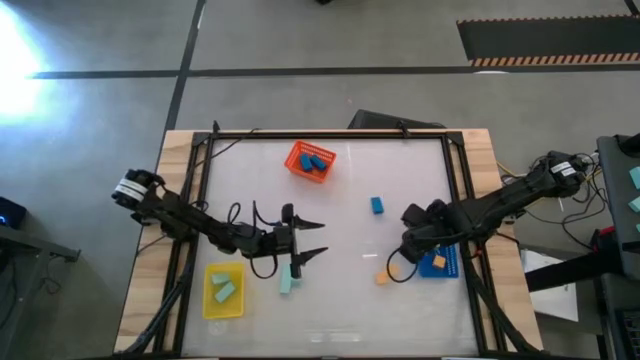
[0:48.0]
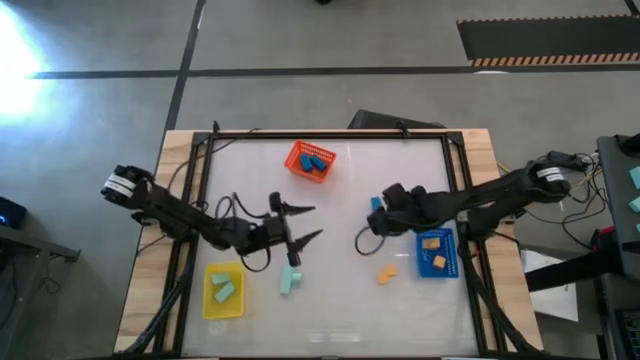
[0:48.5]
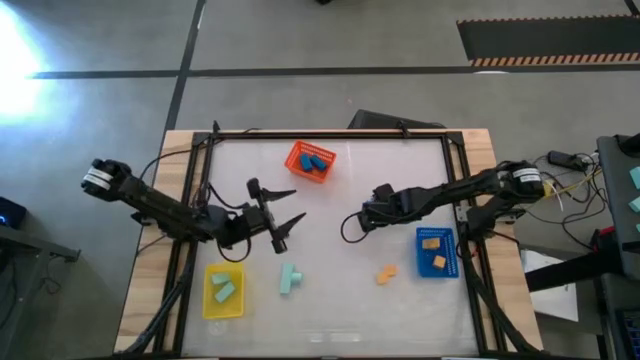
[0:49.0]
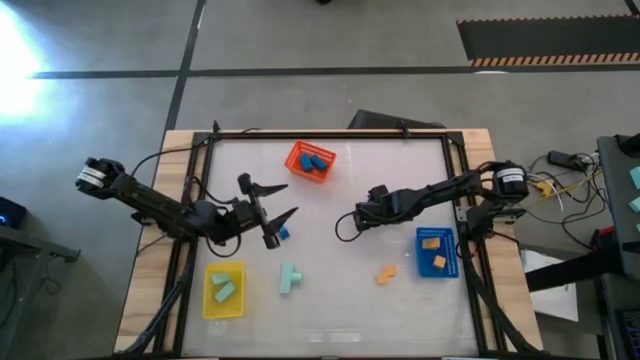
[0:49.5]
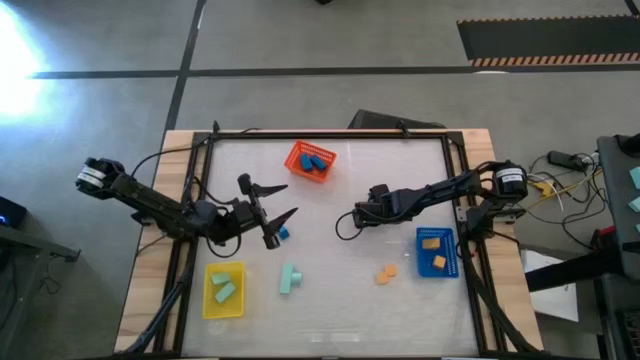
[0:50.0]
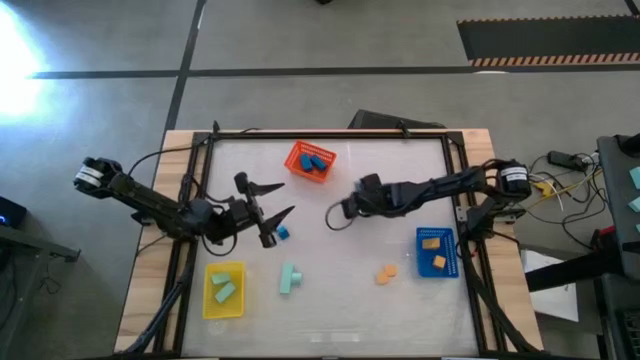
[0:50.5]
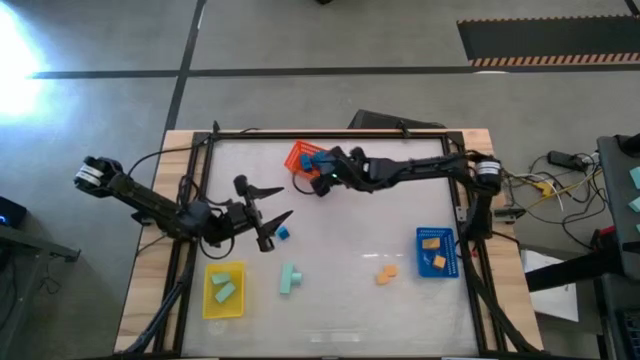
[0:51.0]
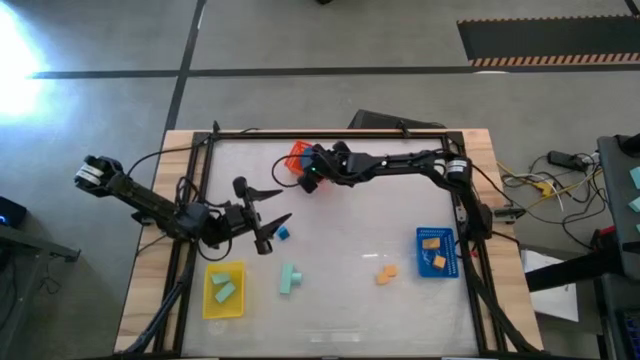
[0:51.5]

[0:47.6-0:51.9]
Task: Sort & place blocks by color
Put the blue block into the orange bin

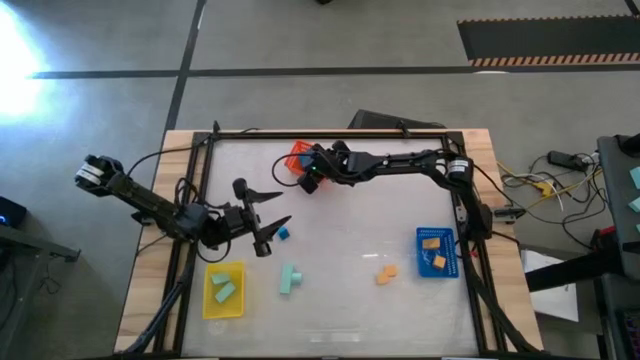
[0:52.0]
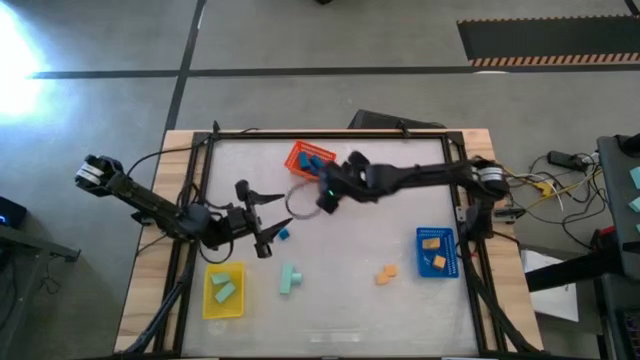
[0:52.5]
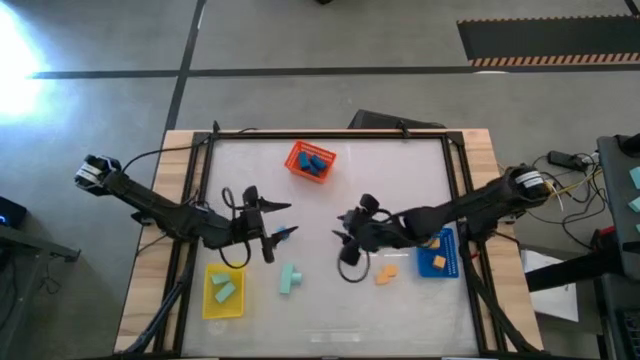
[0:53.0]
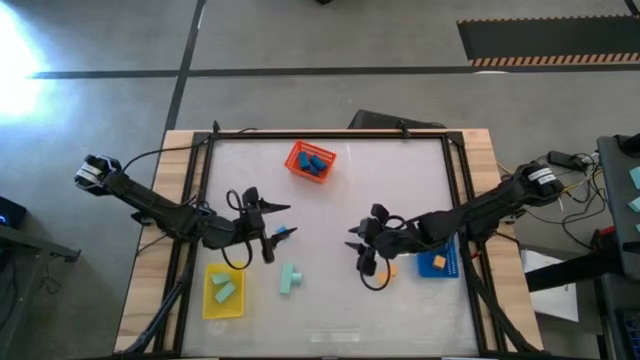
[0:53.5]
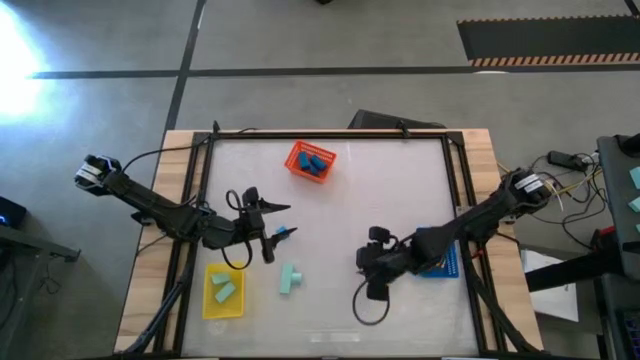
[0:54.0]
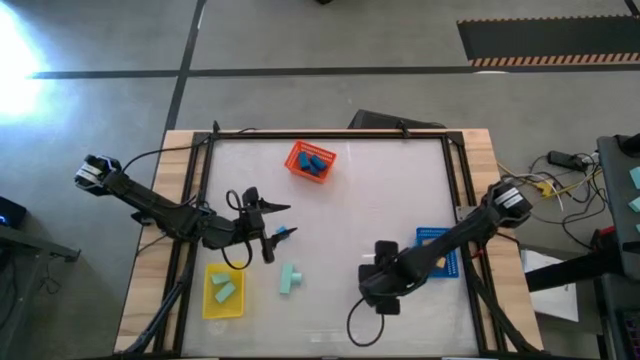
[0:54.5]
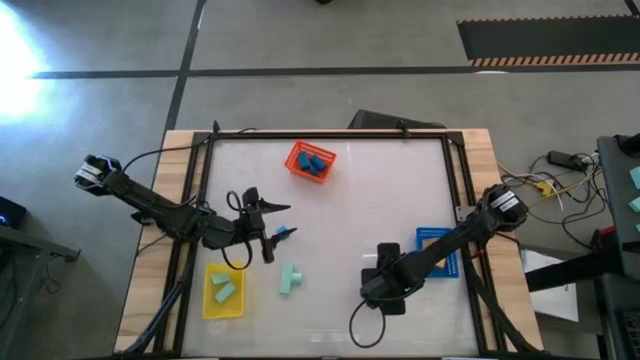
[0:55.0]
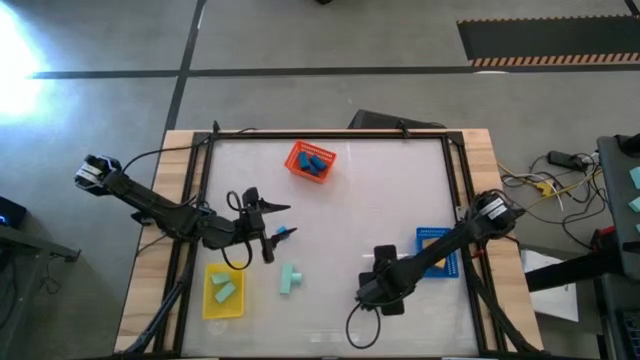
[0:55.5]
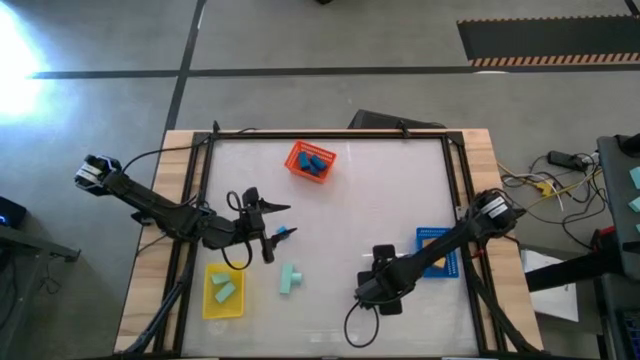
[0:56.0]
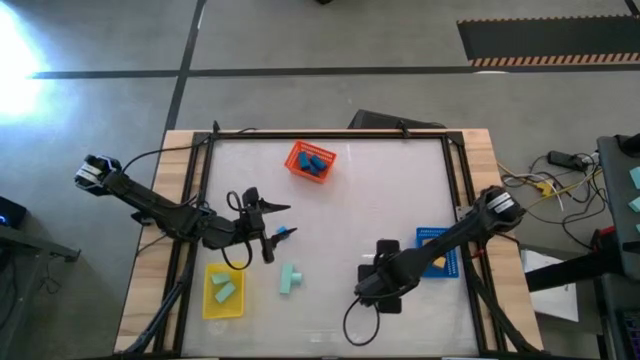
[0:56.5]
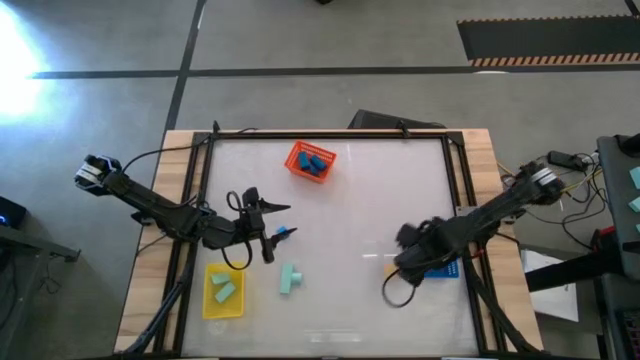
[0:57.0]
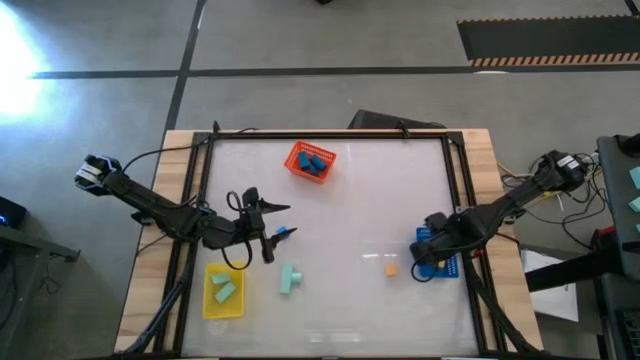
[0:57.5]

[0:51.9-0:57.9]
Put the yellow block into the blue bin

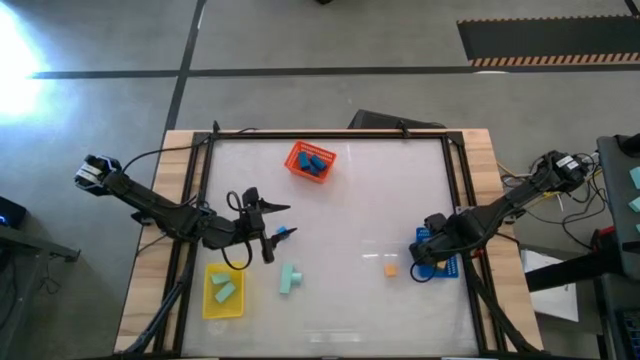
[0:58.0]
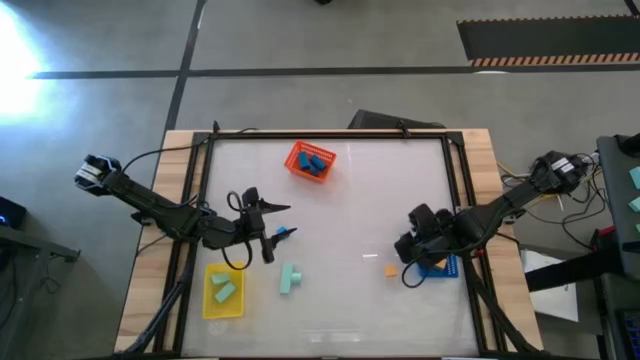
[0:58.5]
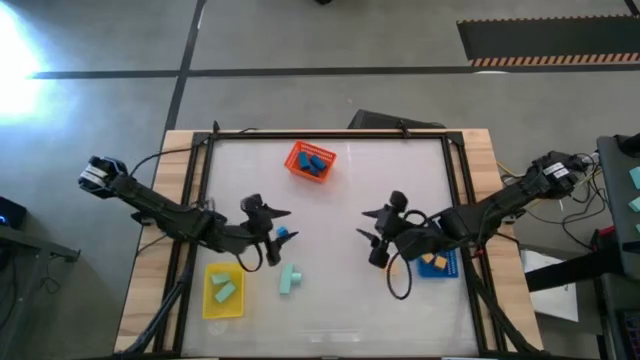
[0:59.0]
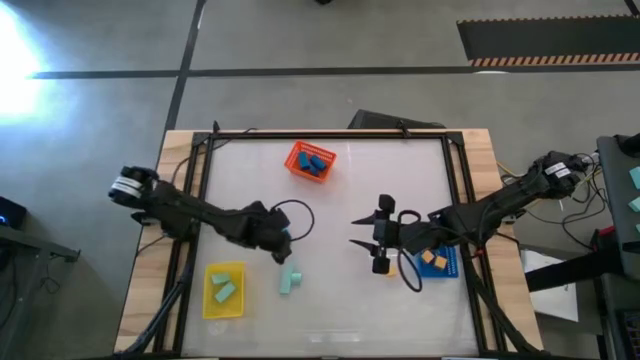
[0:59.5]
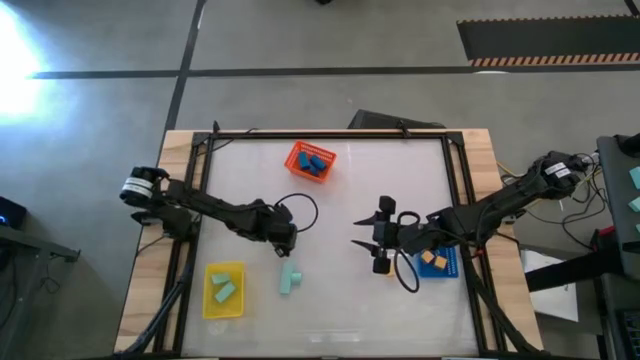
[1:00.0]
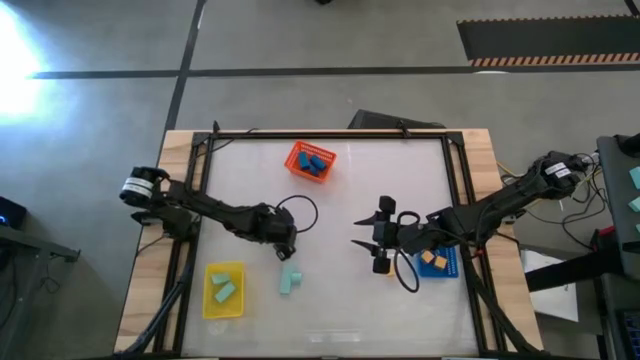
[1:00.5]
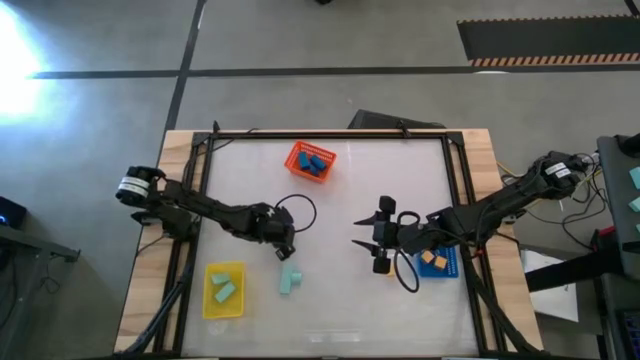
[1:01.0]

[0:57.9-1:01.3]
Put the blue block into the orange bin

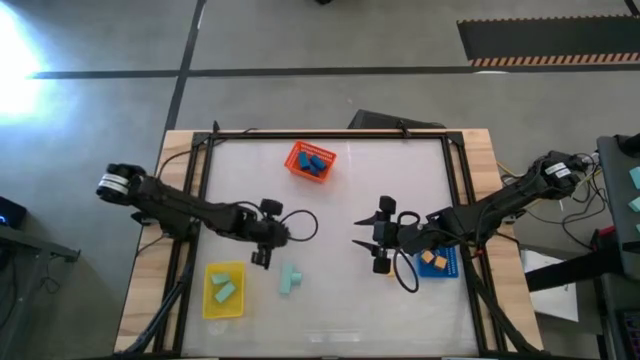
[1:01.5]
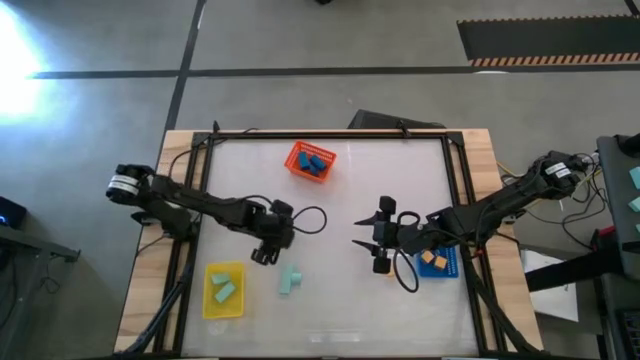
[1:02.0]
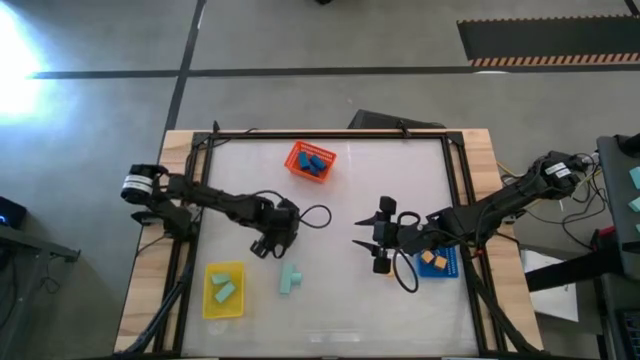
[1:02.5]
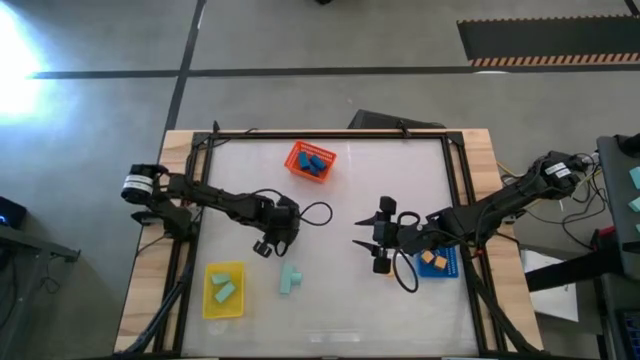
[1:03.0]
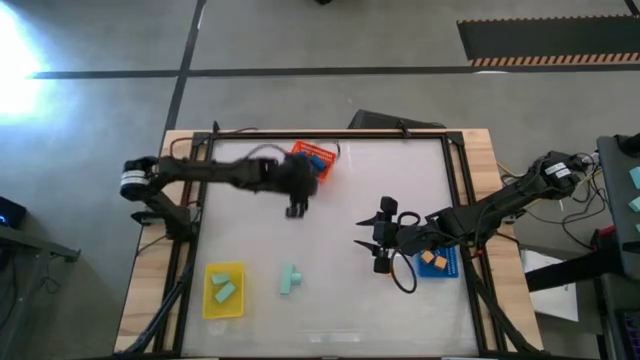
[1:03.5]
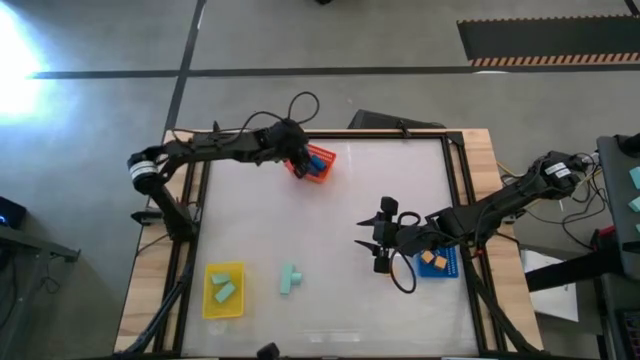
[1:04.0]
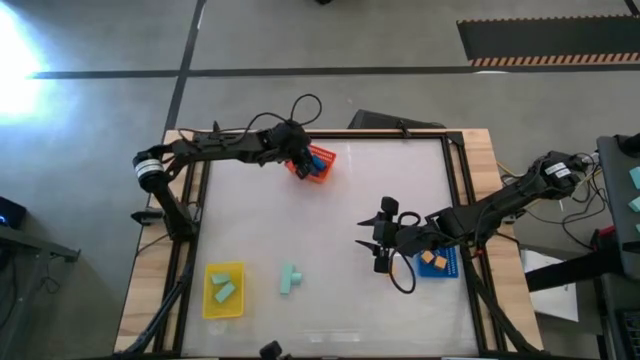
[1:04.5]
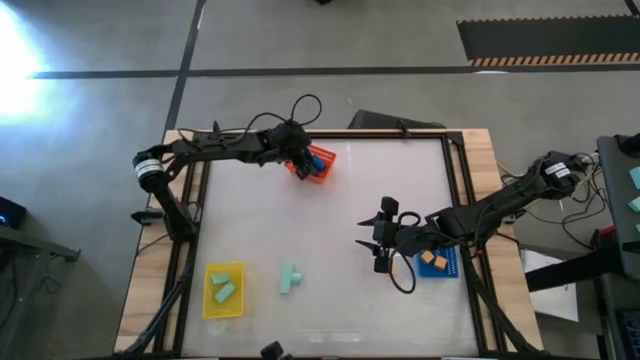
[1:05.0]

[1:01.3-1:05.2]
Put the blue block into the orange bin

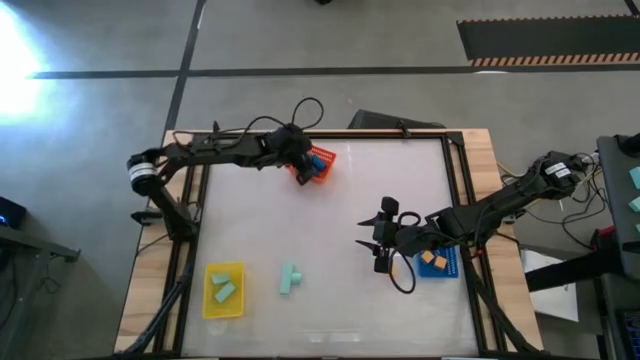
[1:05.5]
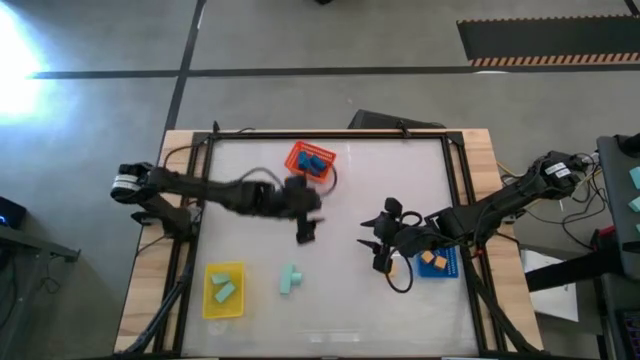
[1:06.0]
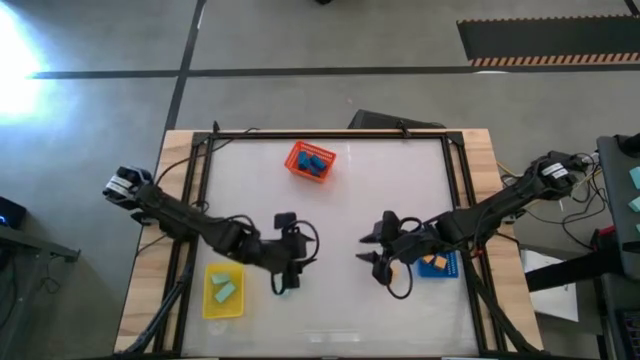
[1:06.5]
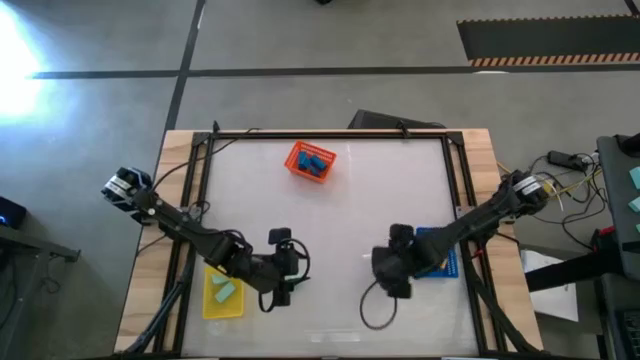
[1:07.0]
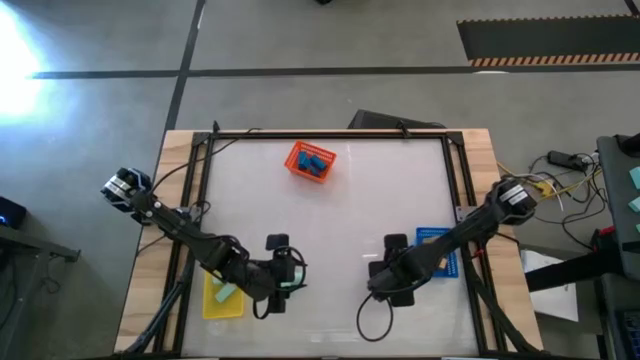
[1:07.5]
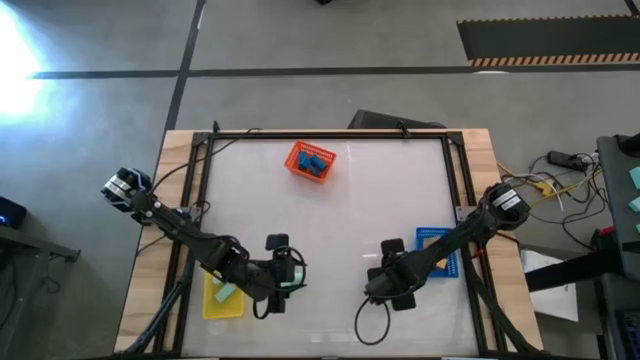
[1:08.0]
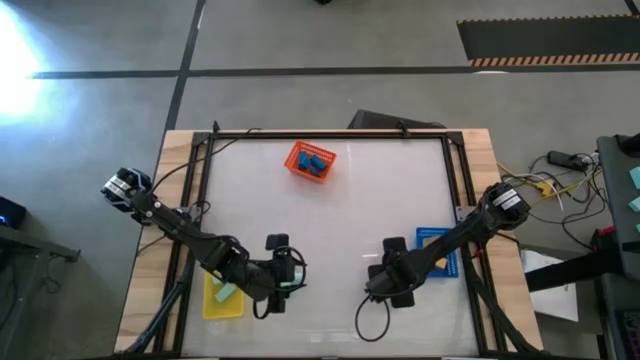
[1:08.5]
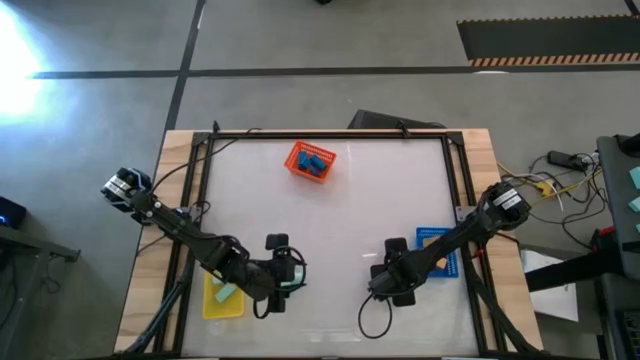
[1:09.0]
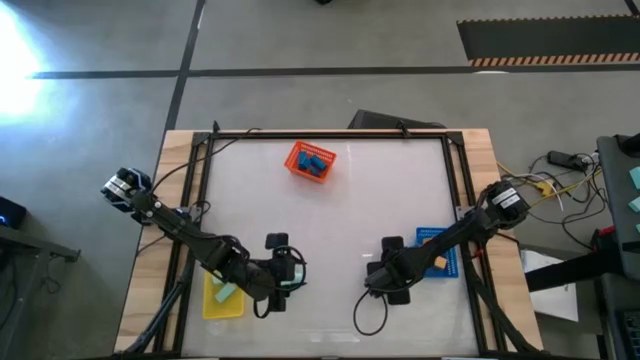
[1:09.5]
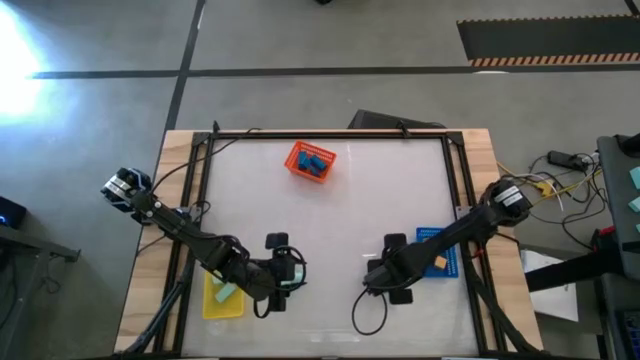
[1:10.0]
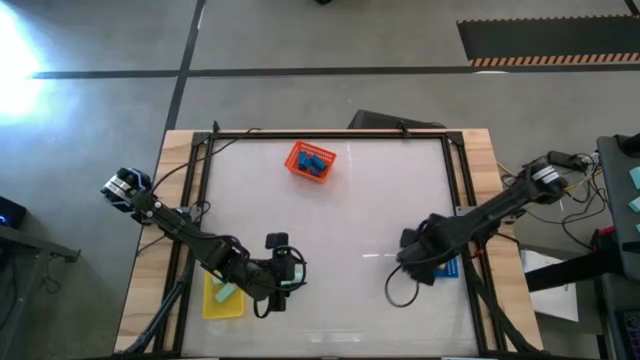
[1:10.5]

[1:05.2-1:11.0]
Put the yellow block into the blue bin
